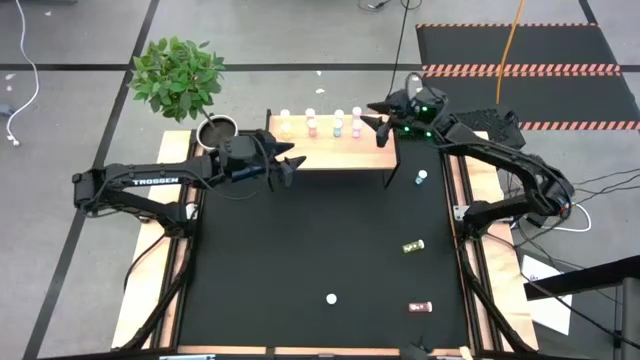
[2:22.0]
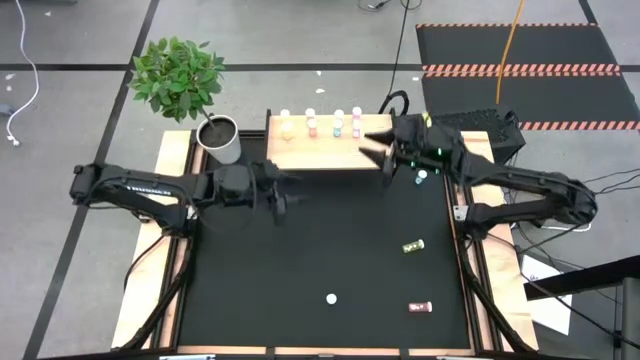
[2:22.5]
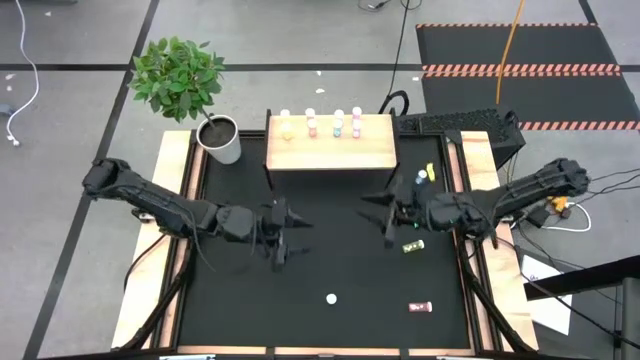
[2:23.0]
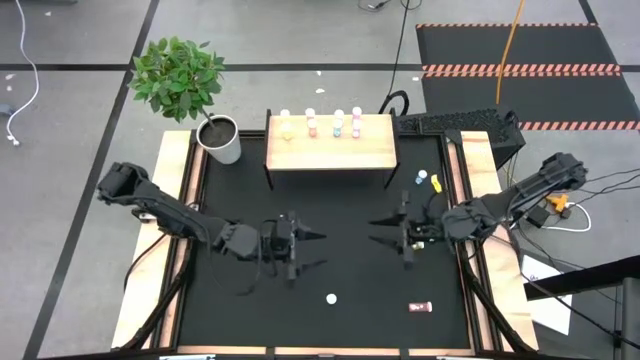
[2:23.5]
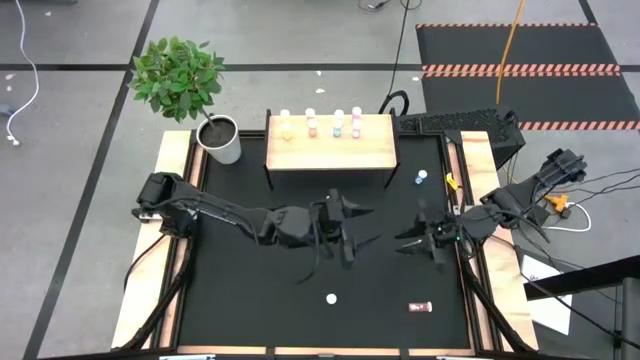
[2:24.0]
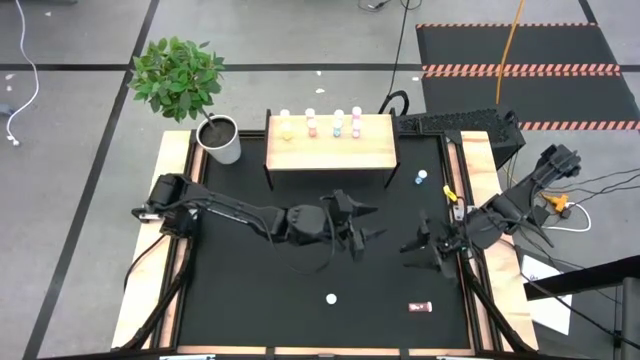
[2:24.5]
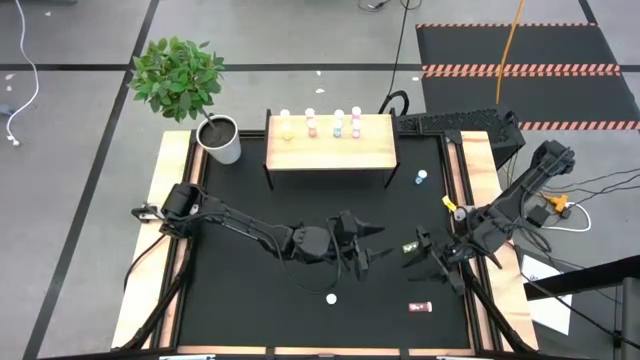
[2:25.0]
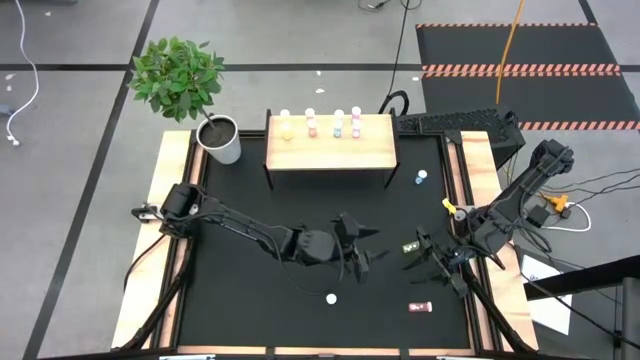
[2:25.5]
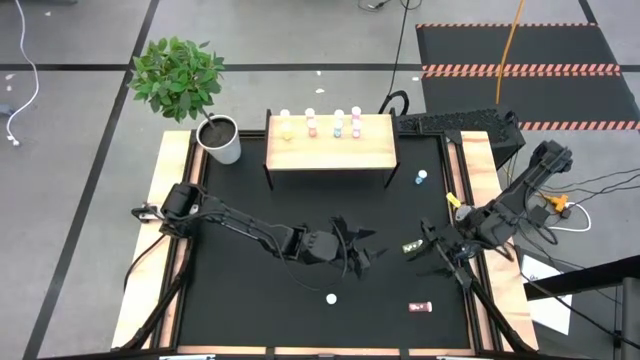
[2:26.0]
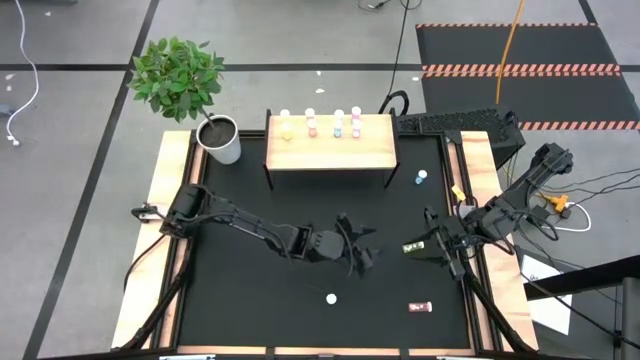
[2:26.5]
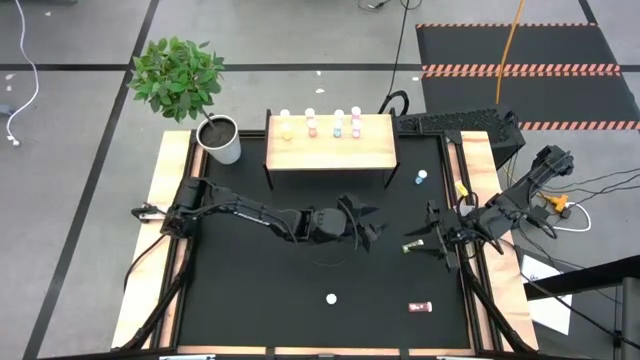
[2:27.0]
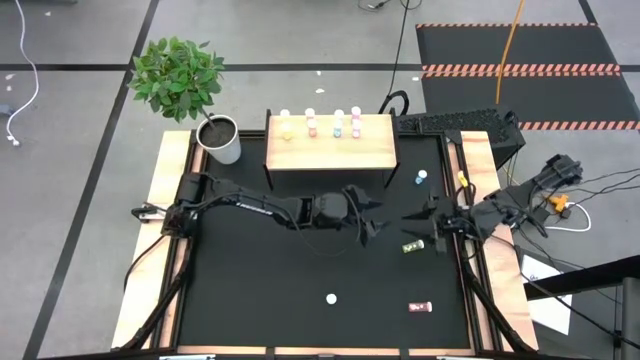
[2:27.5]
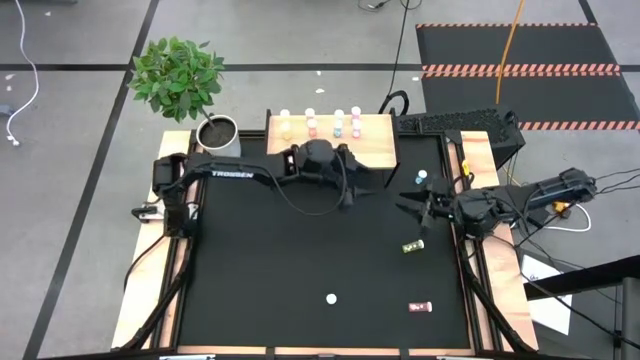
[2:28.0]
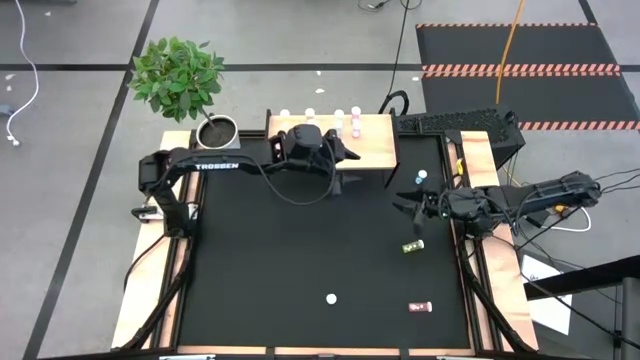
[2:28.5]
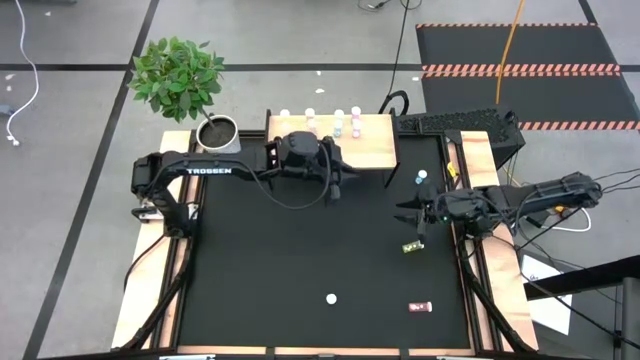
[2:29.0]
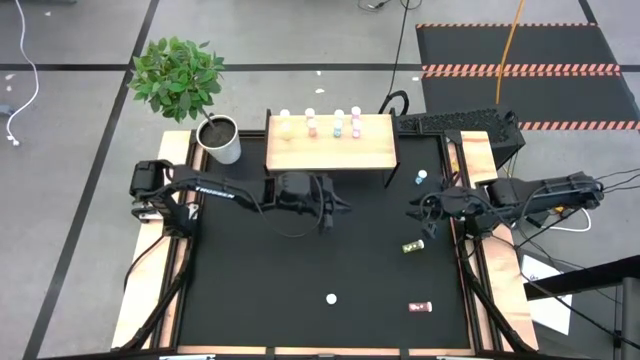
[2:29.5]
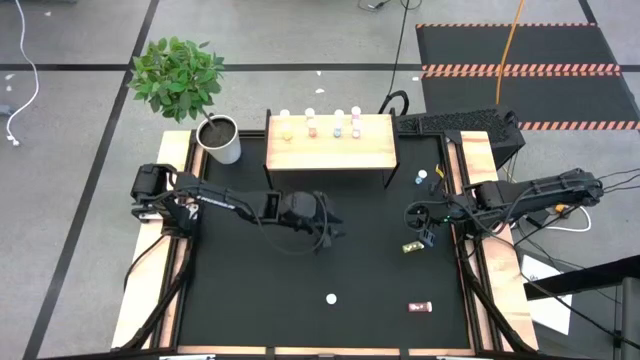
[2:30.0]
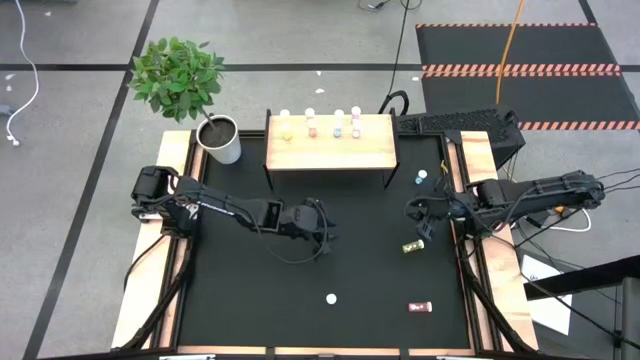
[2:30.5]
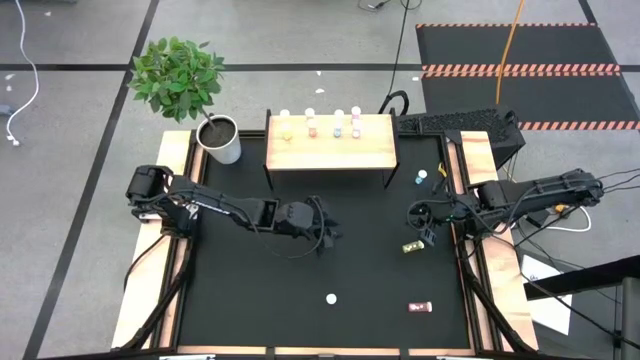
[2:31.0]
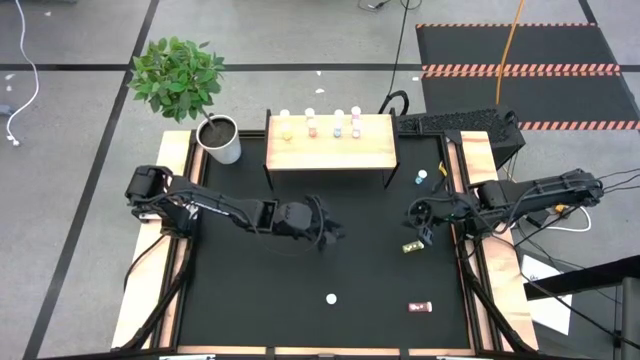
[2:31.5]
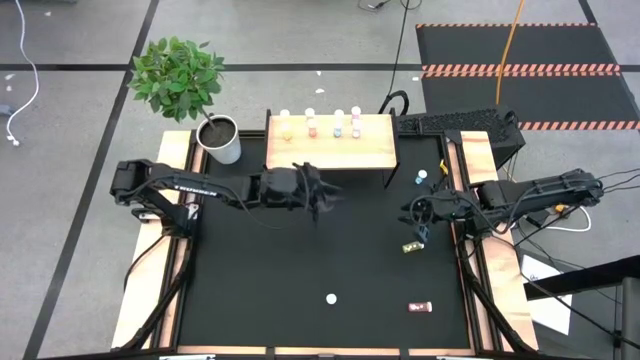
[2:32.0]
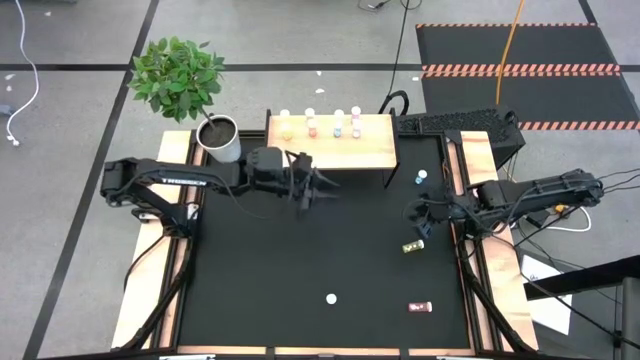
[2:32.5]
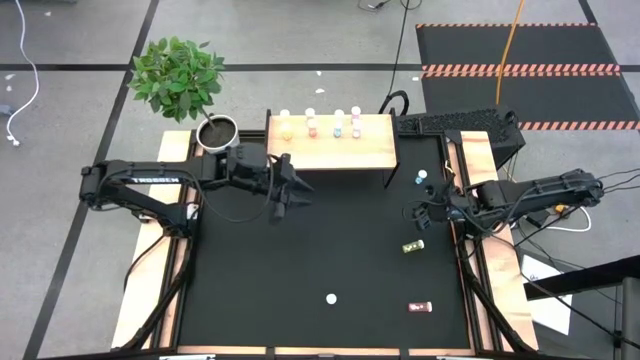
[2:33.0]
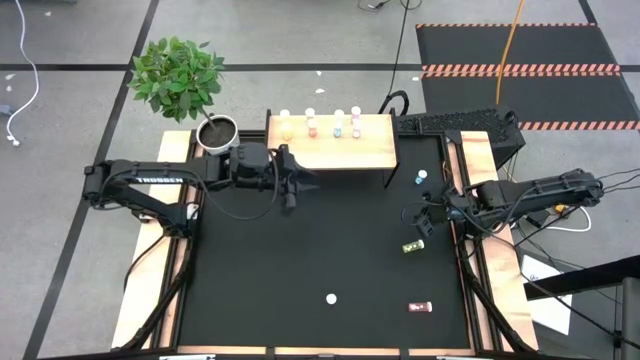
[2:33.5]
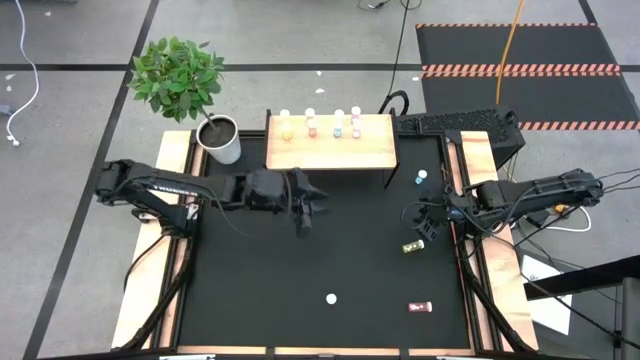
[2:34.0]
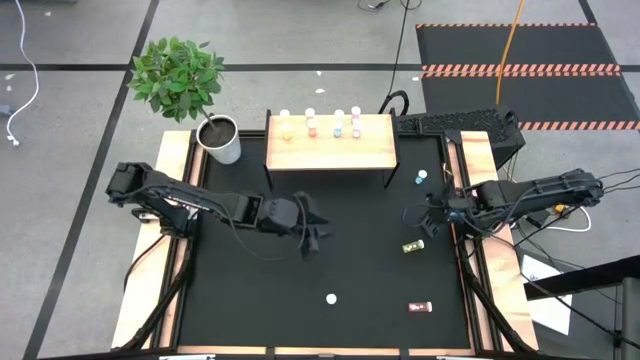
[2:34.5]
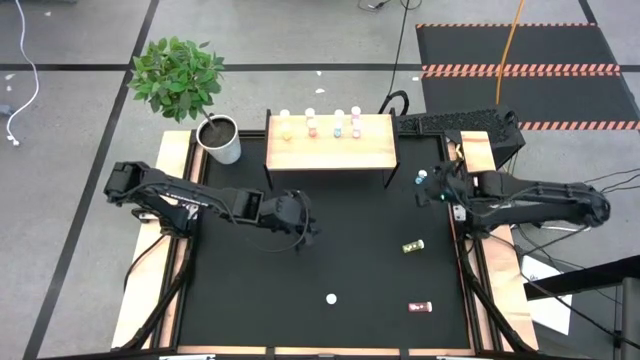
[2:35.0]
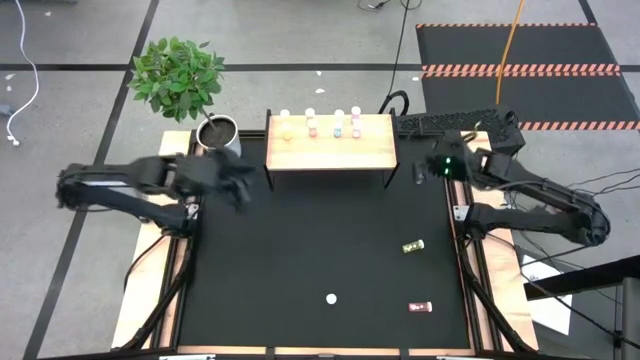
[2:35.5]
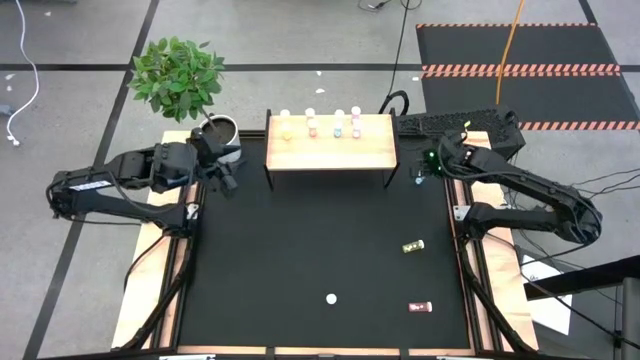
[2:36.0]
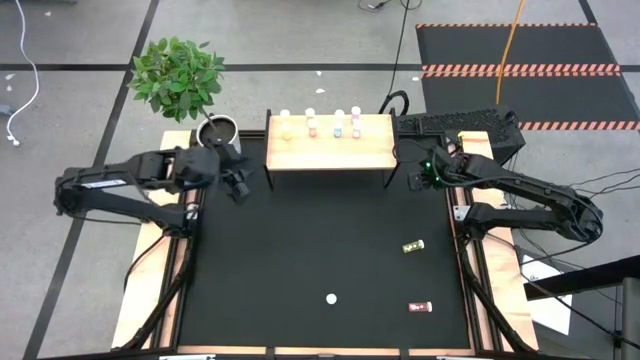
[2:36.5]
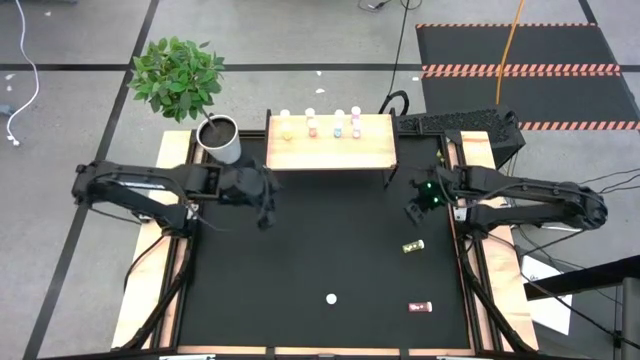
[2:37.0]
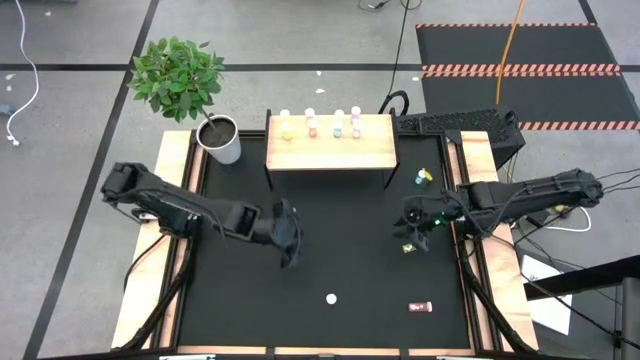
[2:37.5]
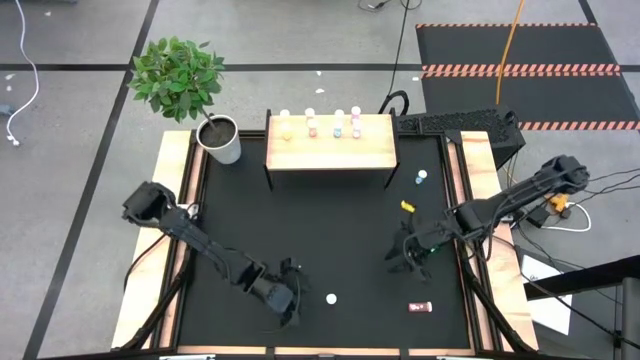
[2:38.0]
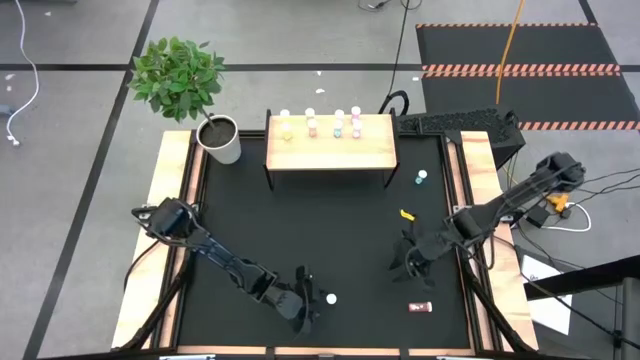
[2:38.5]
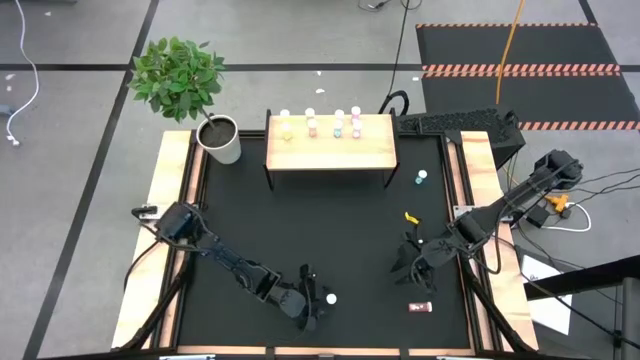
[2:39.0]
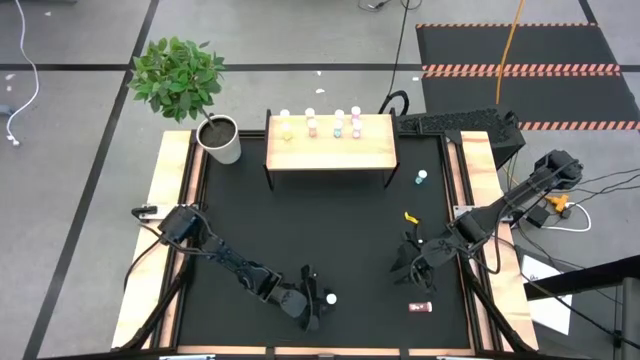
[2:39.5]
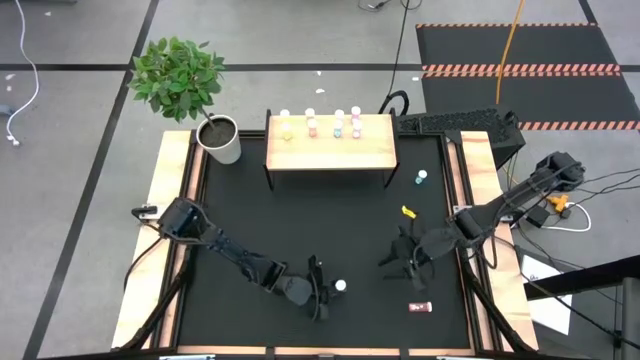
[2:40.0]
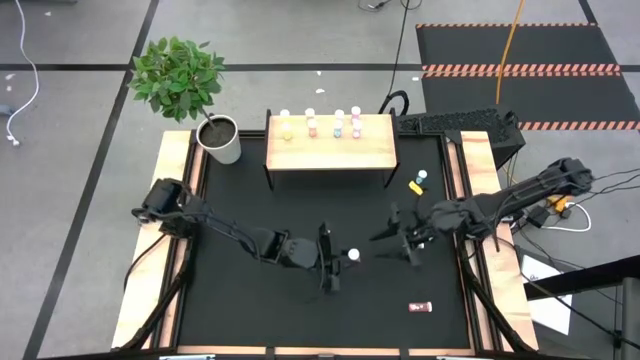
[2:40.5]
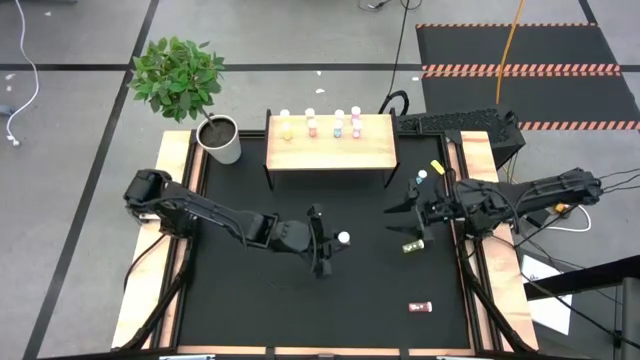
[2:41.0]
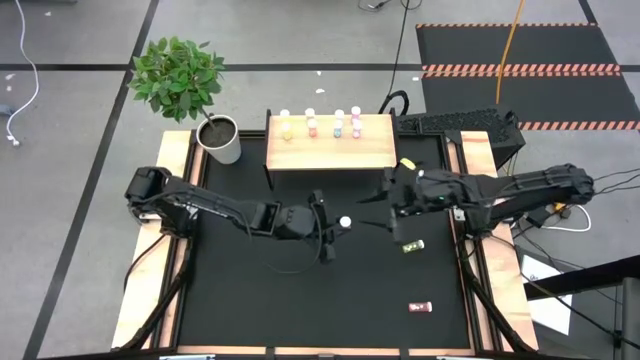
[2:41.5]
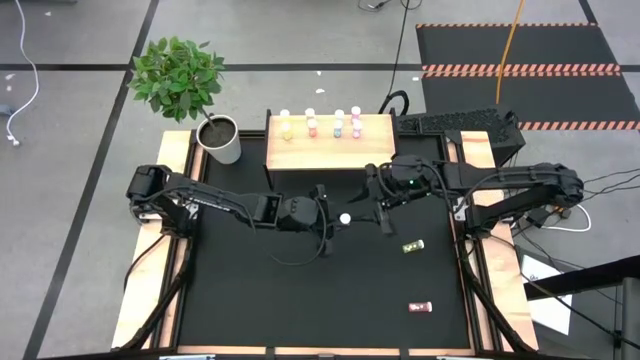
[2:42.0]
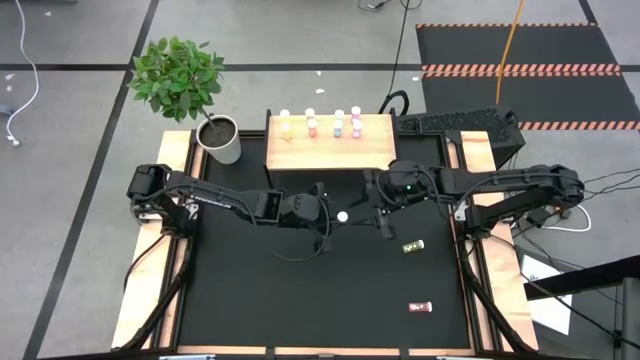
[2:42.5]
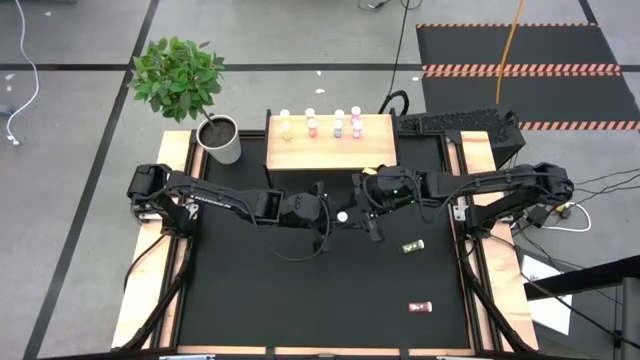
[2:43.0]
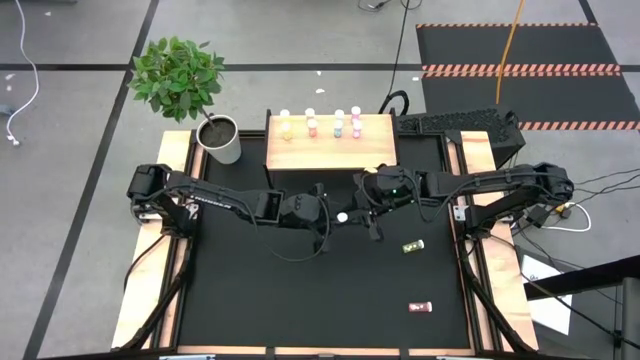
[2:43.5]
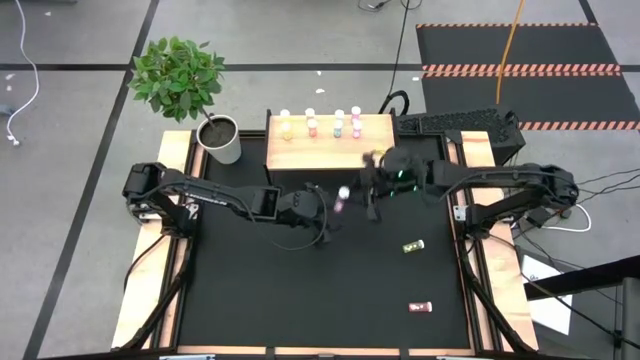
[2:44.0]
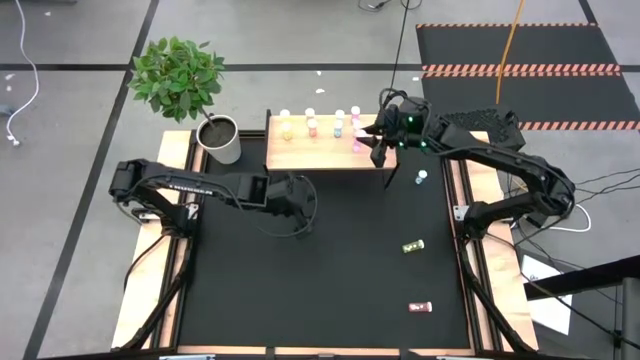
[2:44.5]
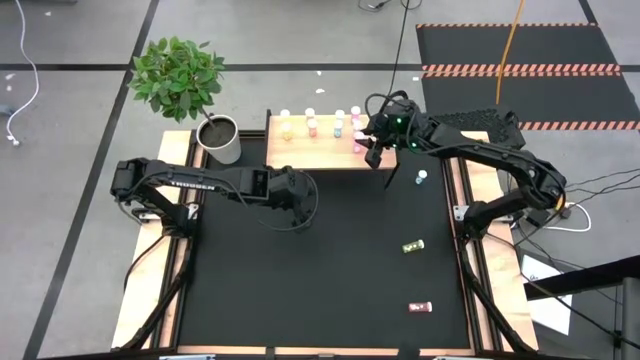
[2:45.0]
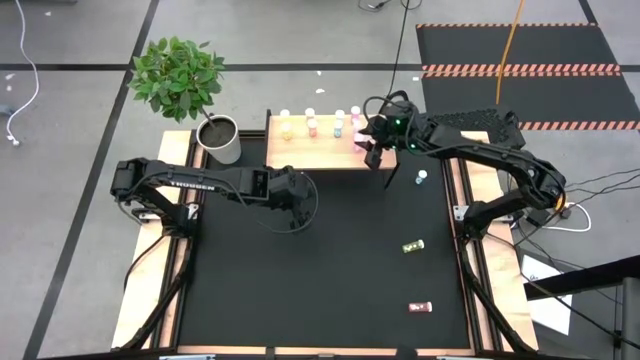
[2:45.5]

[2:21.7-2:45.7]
Task: Pick and place medicine bottles onto shelf by color
Put the pink pill bottle on the shelf aligned with the other pink pill bottles
